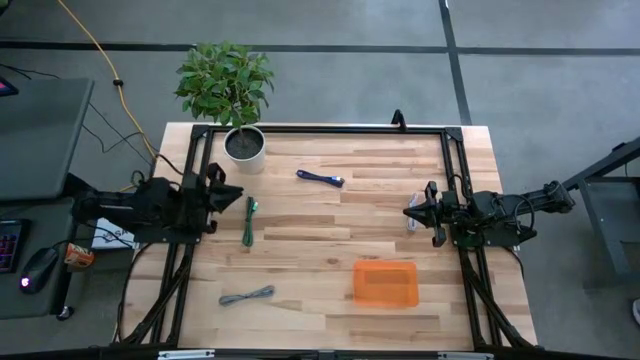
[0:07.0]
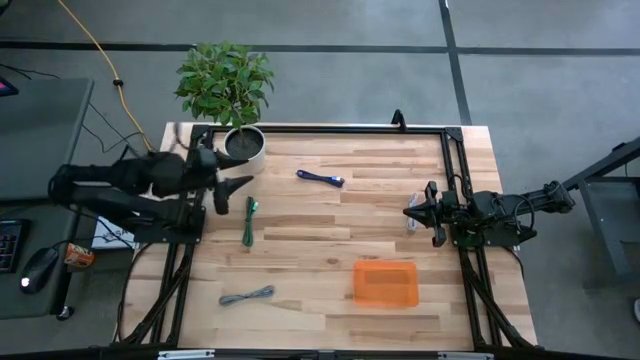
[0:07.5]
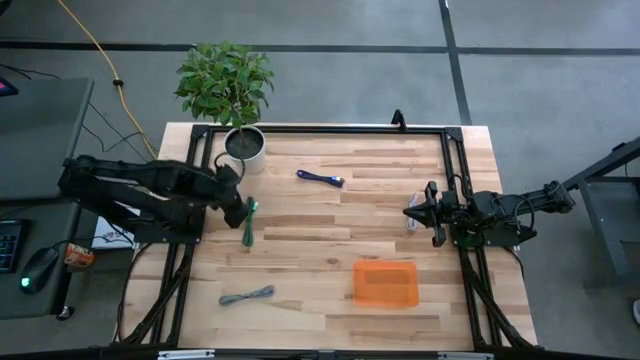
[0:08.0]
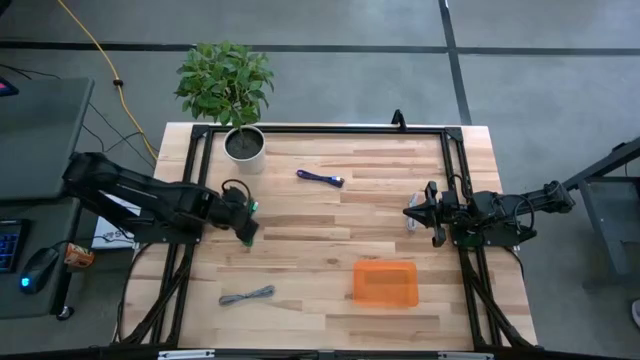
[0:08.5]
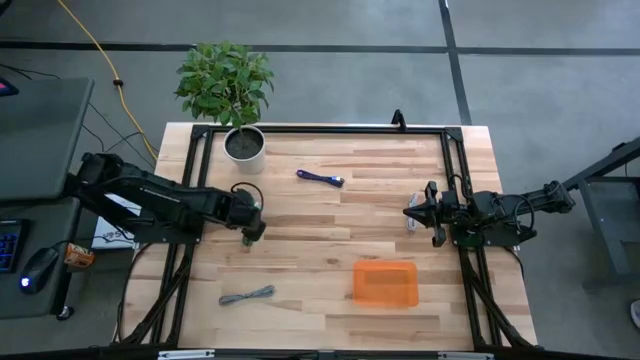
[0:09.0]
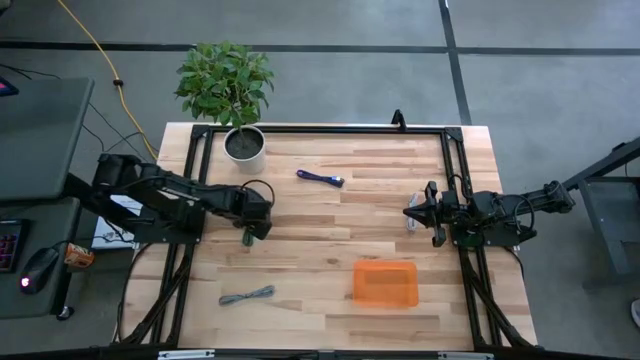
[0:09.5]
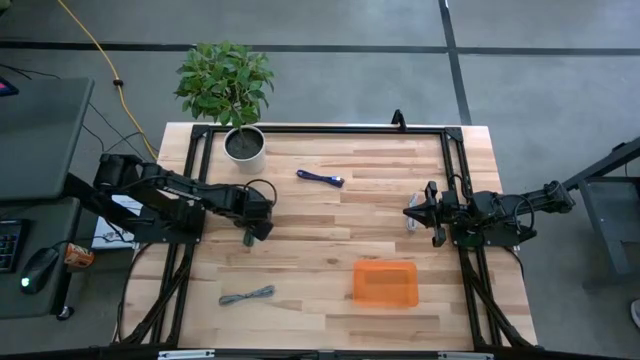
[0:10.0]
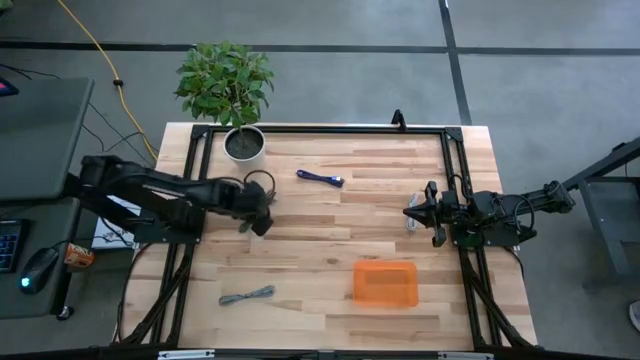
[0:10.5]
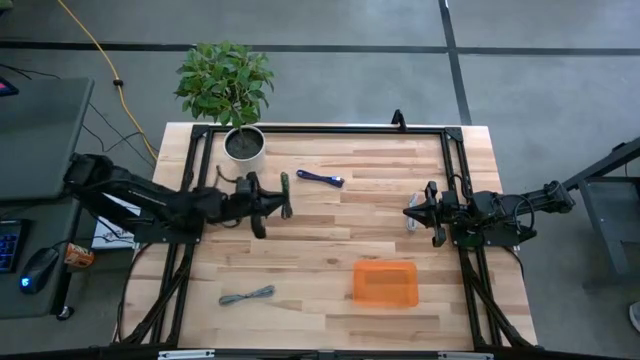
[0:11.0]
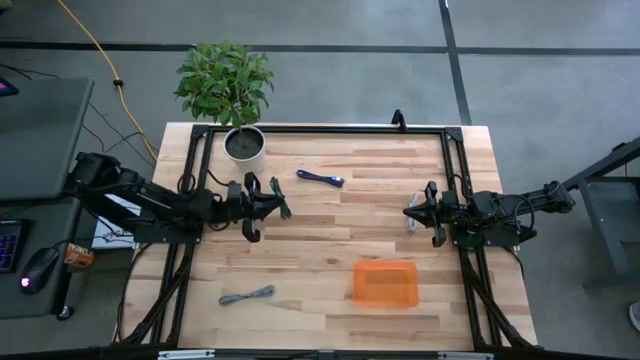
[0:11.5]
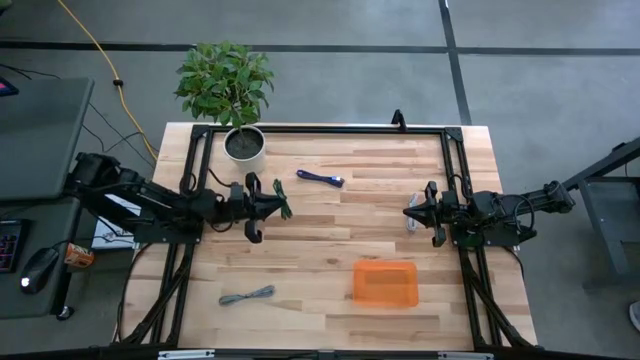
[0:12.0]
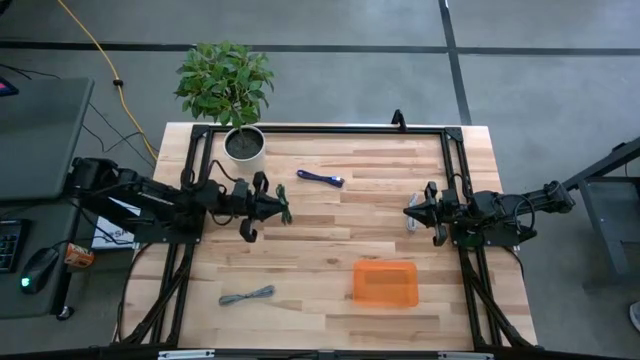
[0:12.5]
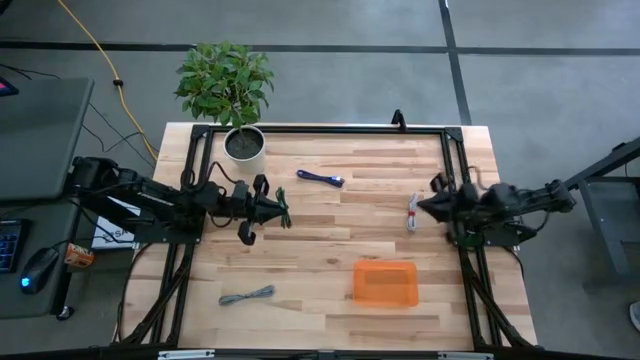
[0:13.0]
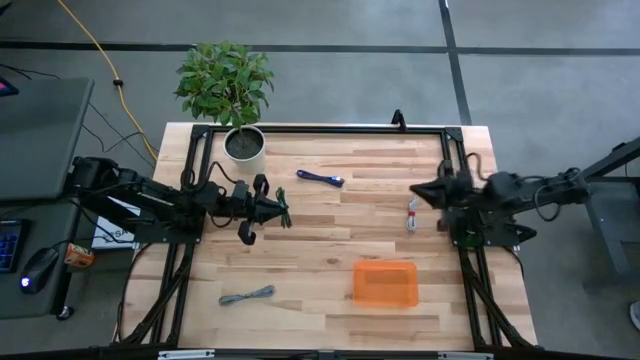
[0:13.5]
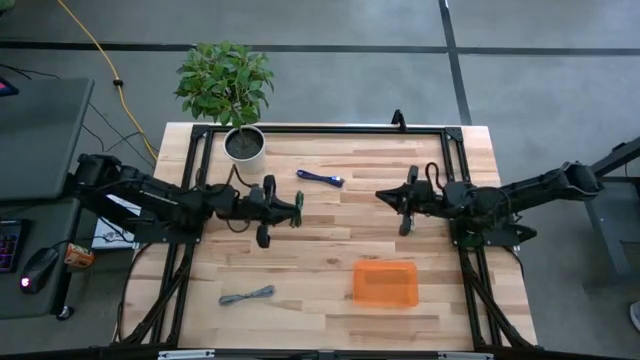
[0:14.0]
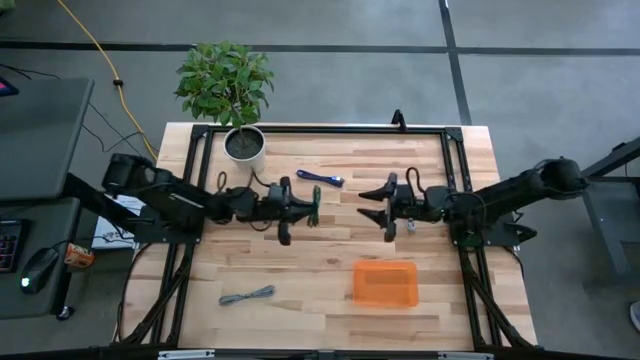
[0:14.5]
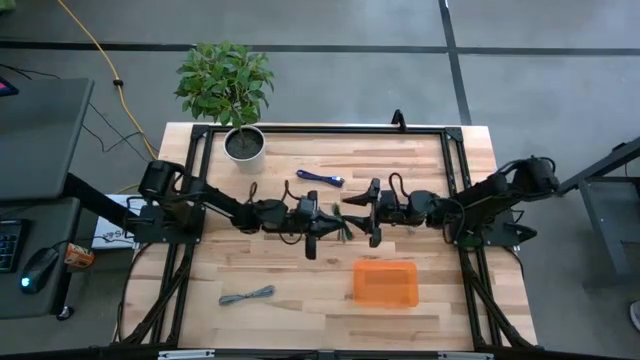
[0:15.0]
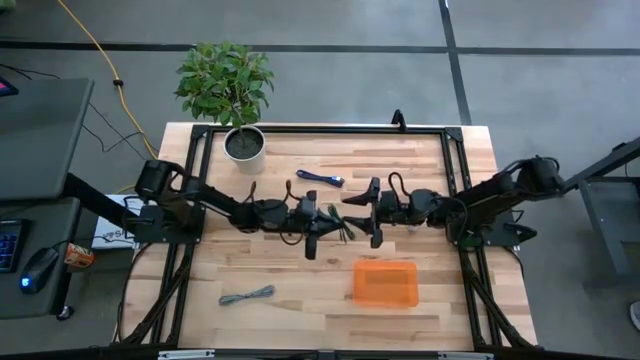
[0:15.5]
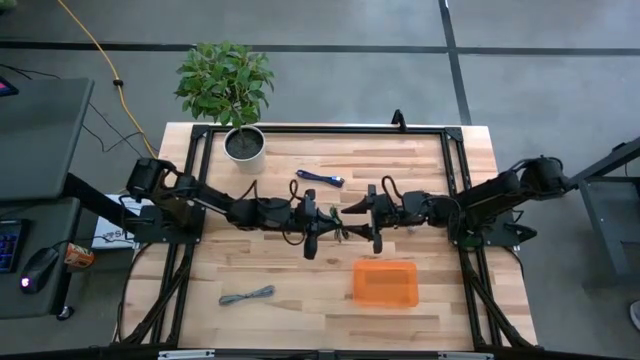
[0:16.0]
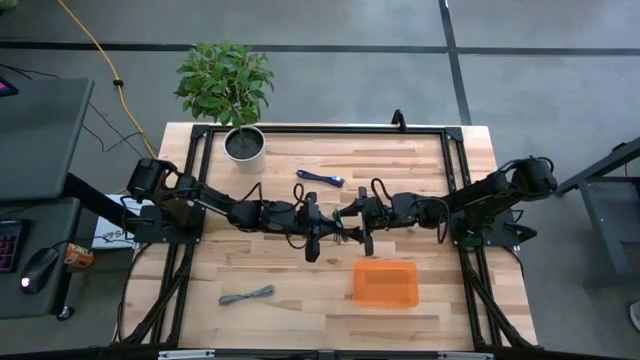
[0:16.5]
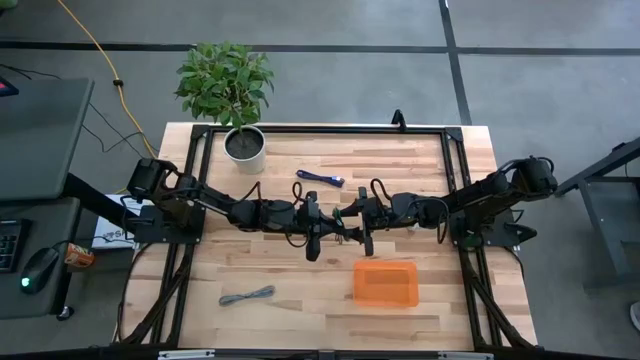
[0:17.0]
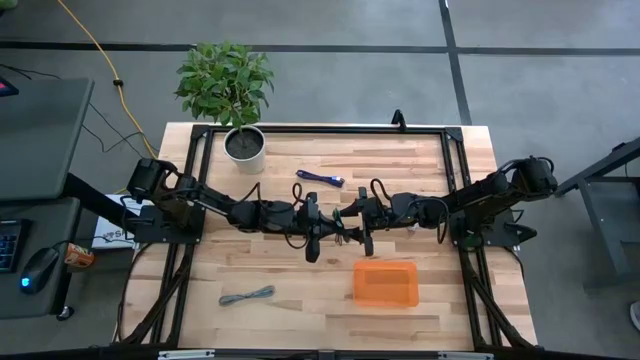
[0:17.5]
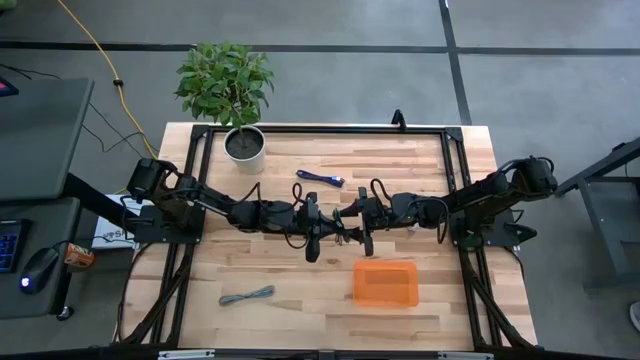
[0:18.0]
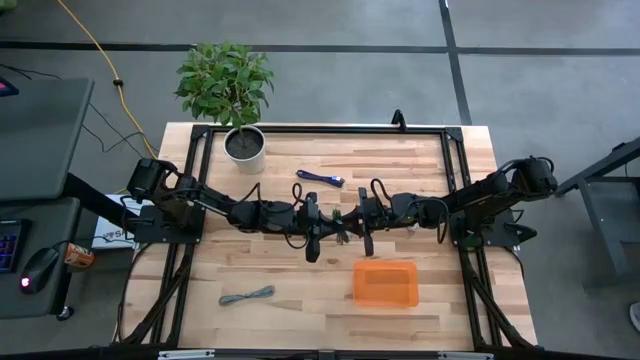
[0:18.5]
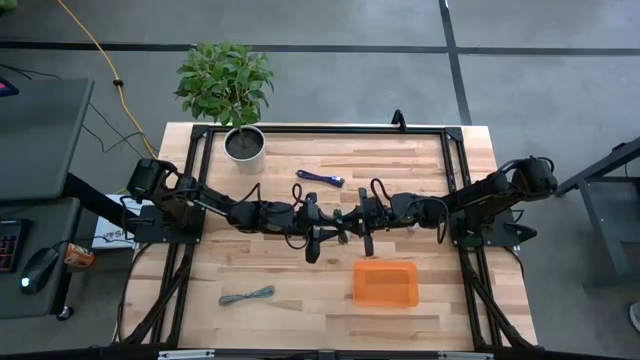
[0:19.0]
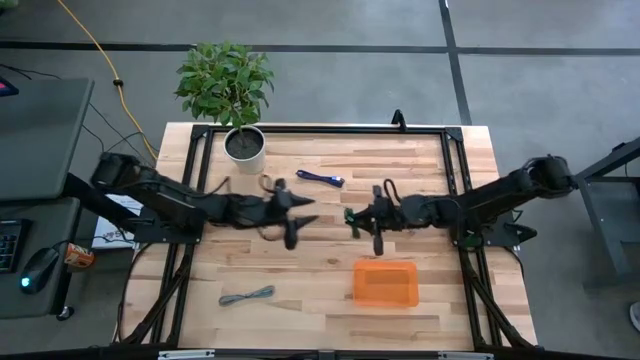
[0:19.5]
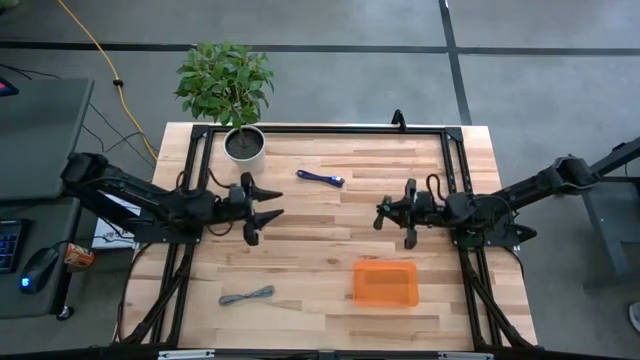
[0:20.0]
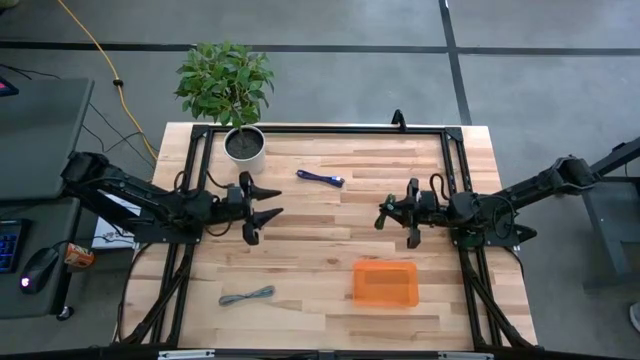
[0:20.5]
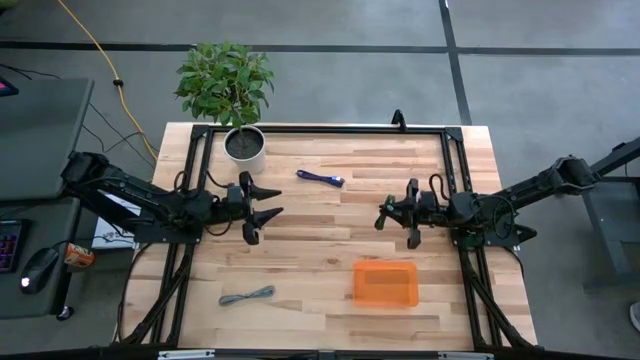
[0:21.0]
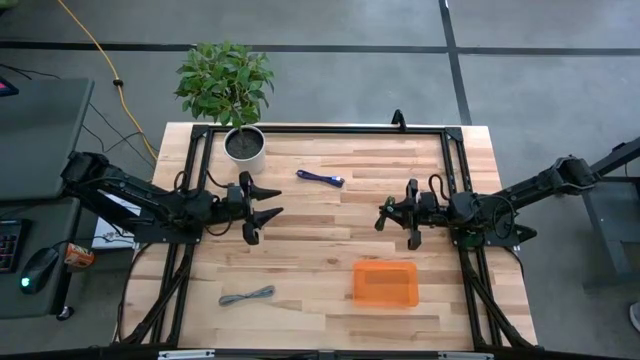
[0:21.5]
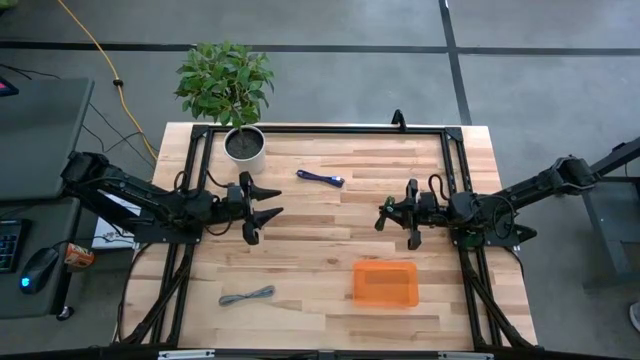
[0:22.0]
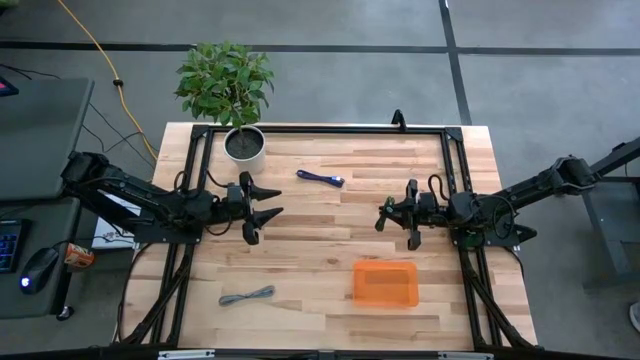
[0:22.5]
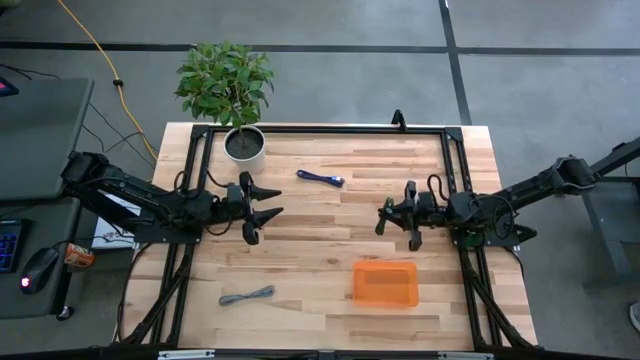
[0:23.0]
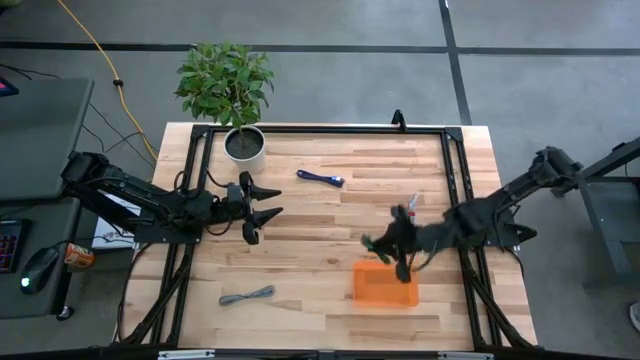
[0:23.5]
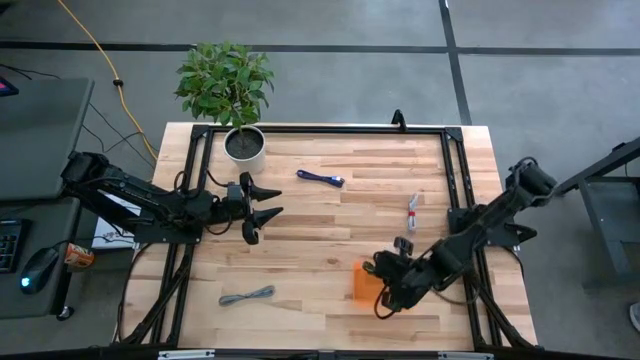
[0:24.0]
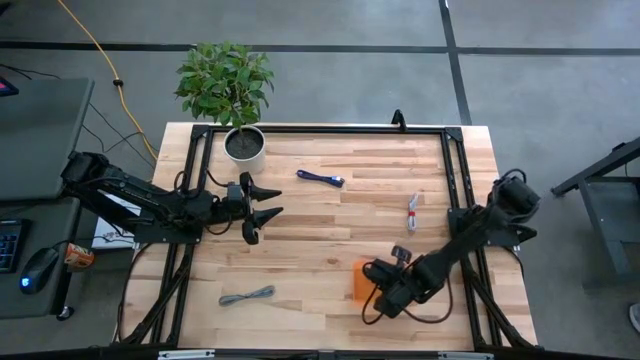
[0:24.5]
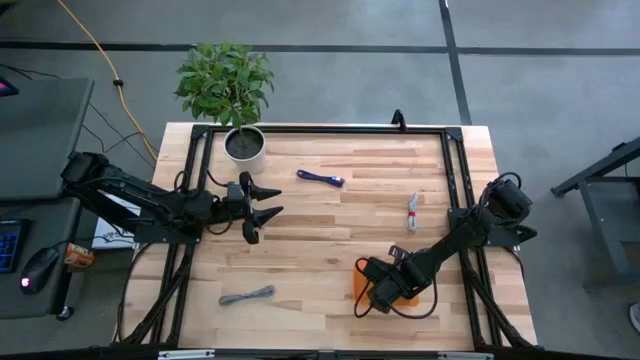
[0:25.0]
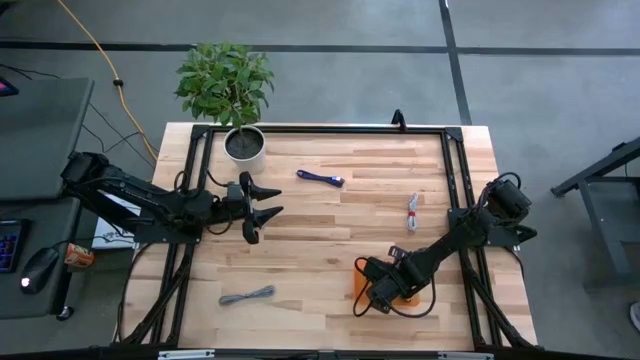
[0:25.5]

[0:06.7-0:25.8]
Task: Pick and place USB-C Cables
Put the green charger cable into the orange bin

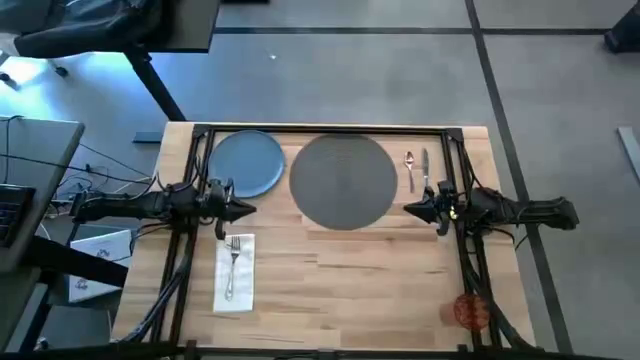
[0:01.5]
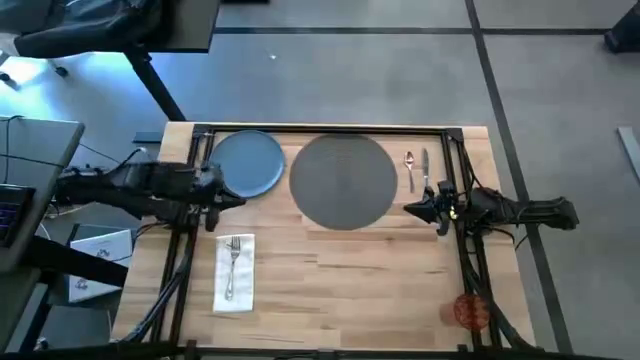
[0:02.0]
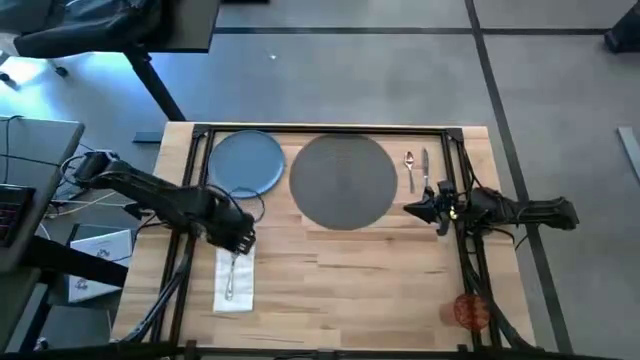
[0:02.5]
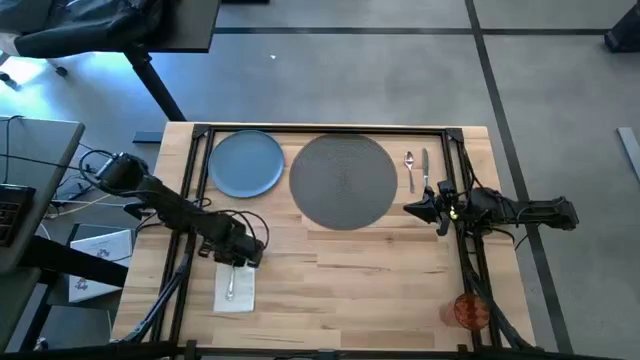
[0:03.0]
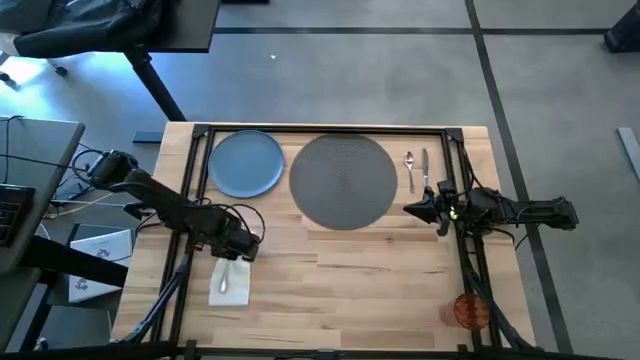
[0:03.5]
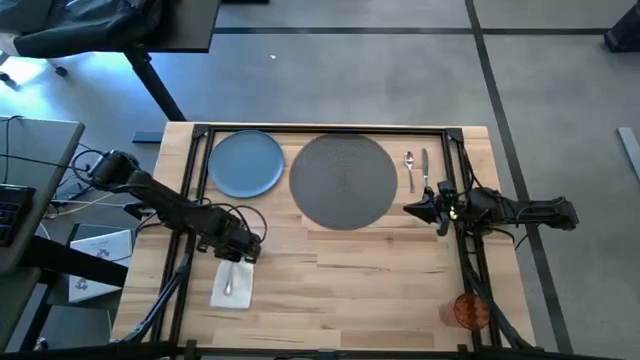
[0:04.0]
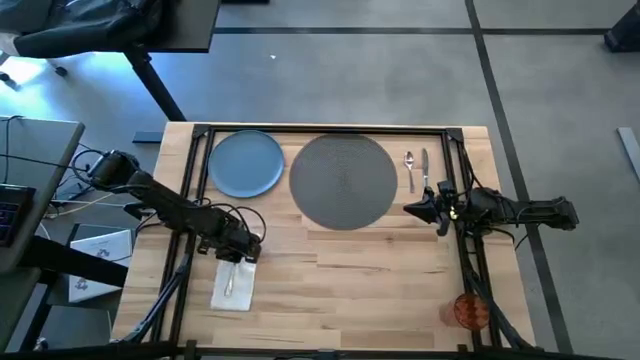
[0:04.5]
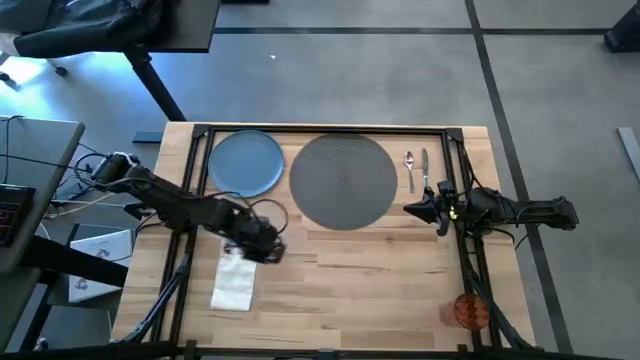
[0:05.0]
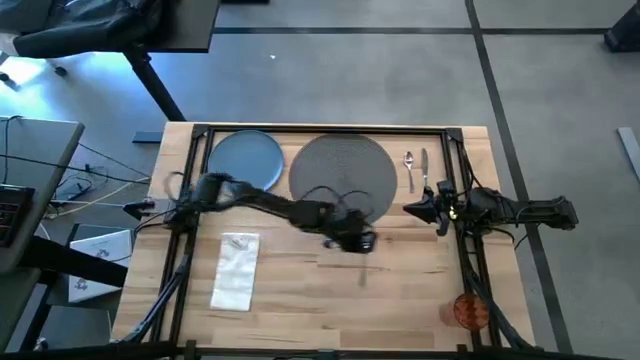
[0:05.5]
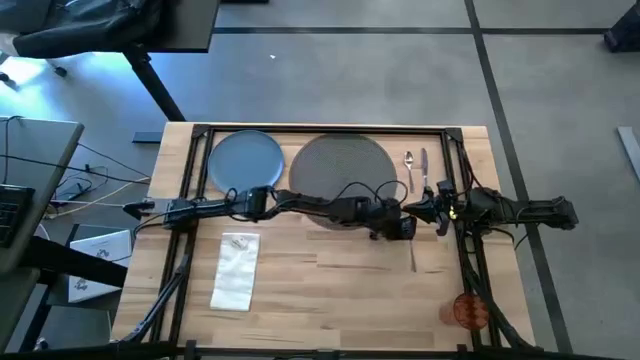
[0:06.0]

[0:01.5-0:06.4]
Task: Set table place
Remove the silver fork from table napkin
